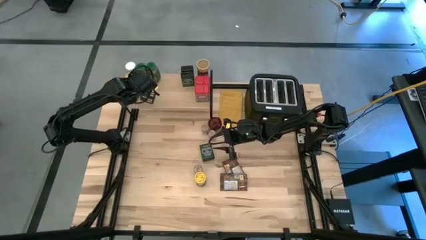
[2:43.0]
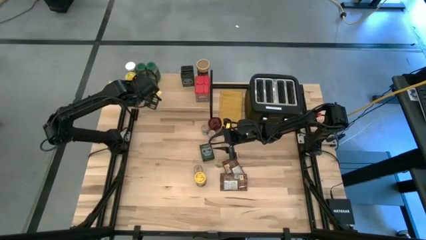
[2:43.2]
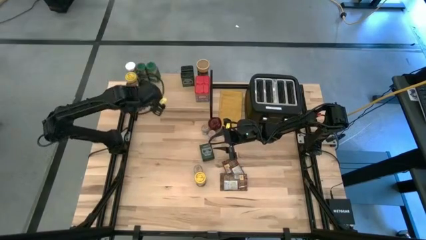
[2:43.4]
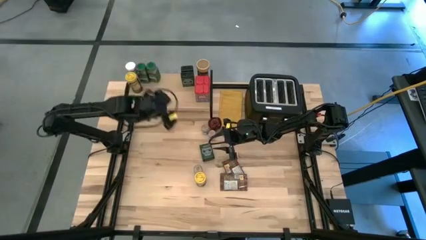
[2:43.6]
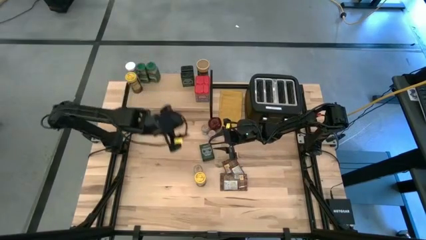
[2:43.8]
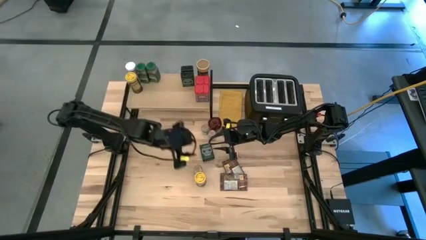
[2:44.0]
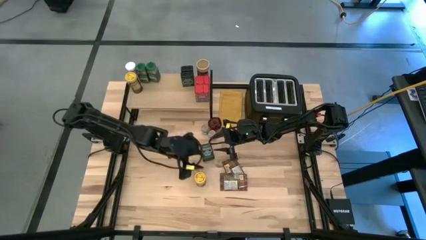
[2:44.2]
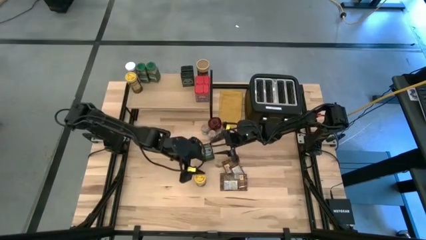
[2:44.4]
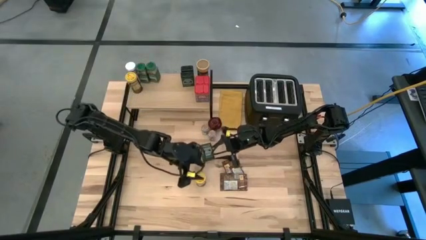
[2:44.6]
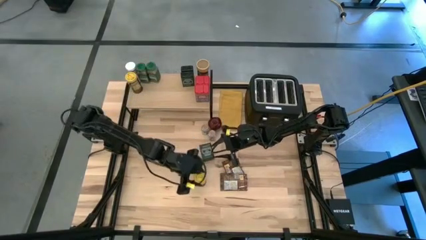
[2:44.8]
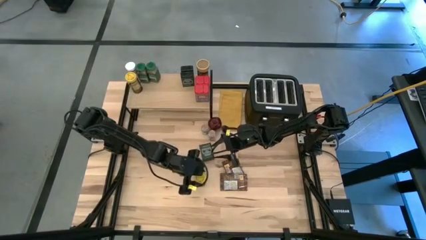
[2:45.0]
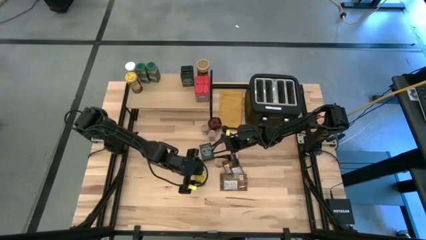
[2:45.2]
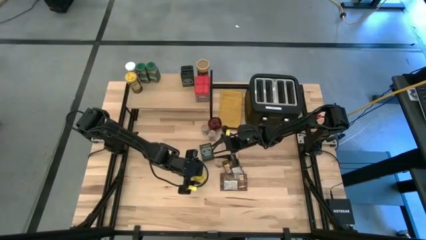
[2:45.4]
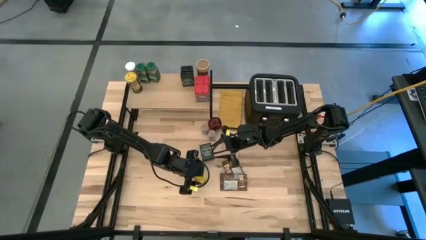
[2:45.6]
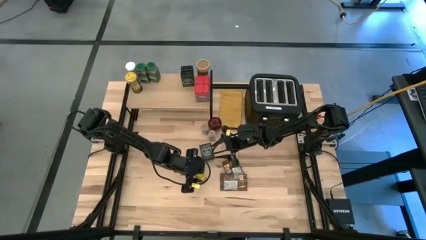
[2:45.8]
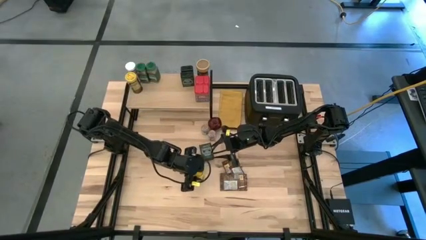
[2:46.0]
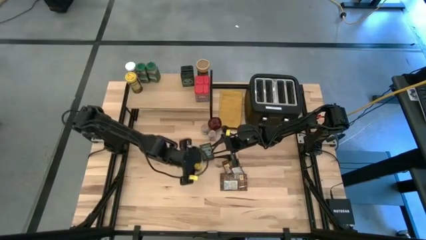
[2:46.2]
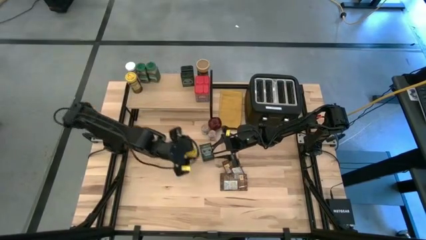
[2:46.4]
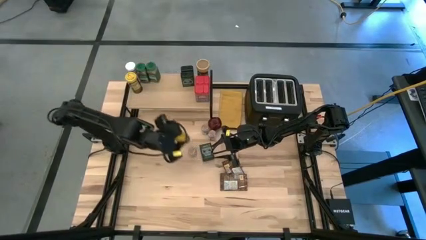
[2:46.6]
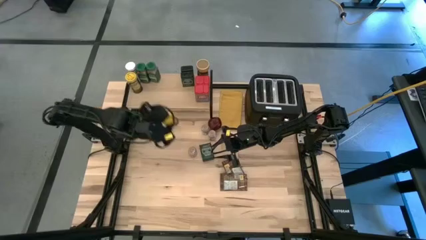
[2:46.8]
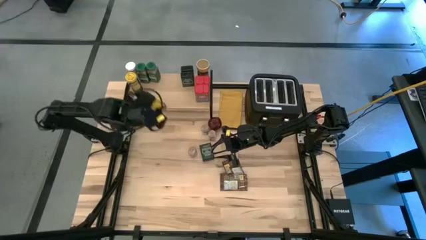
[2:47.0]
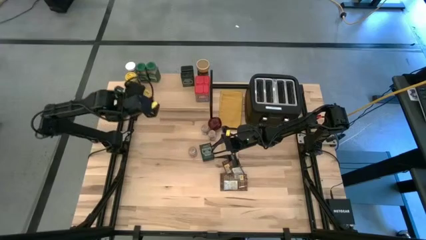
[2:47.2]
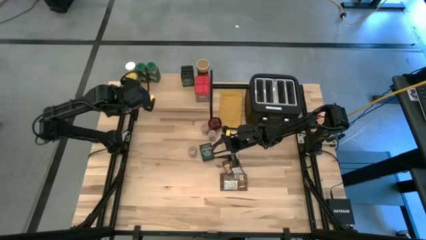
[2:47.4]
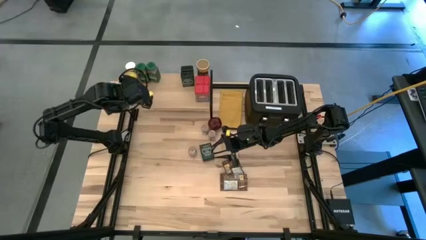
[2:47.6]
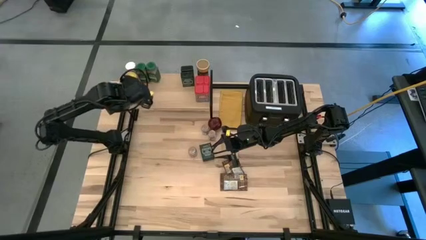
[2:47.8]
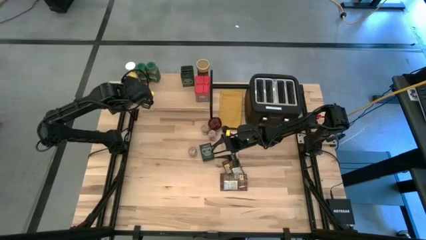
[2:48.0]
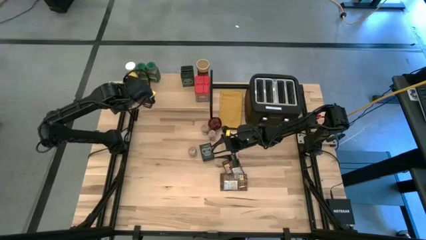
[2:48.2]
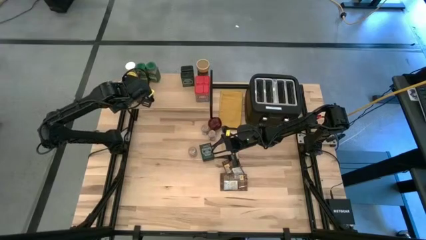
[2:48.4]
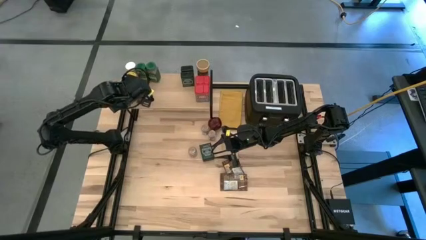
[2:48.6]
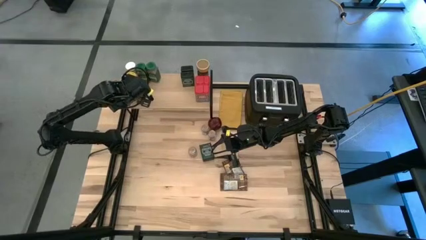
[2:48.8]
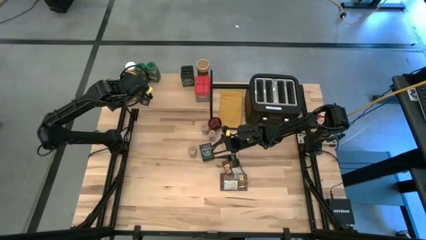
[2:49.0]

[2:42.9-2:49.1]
Task: Shelf spices
Put the yellow seasoning bottle aligned with the other yellow seasoning bottle on the shelf

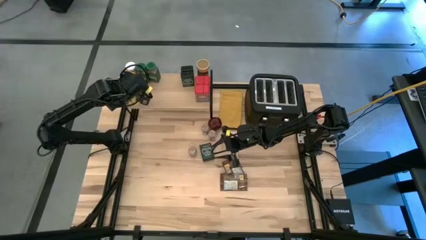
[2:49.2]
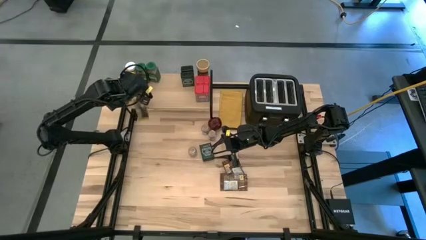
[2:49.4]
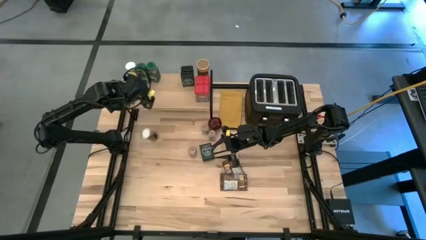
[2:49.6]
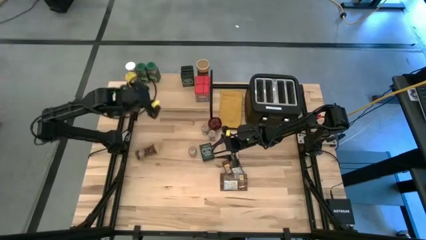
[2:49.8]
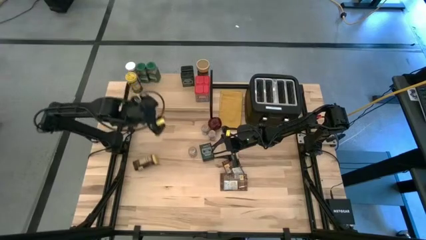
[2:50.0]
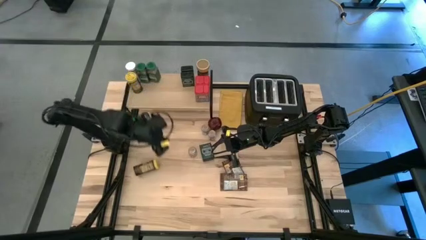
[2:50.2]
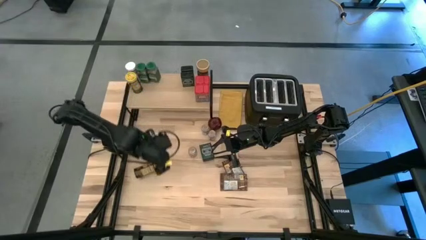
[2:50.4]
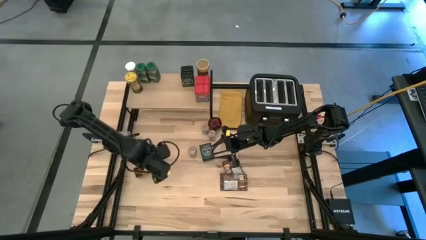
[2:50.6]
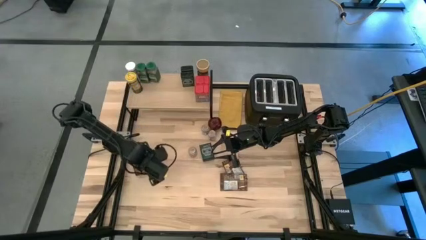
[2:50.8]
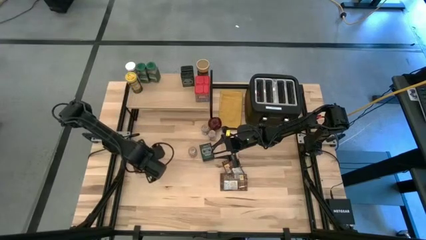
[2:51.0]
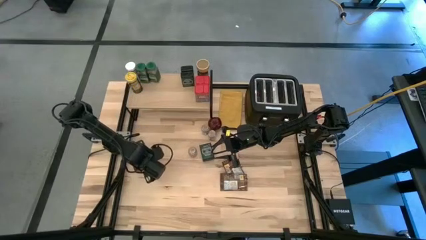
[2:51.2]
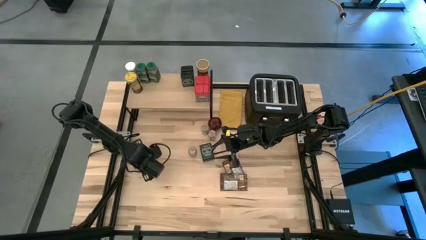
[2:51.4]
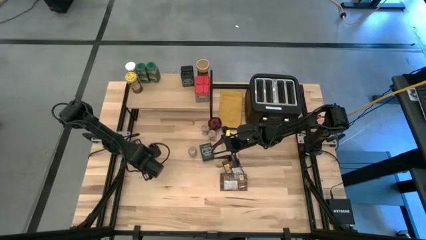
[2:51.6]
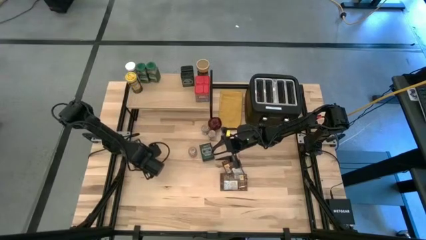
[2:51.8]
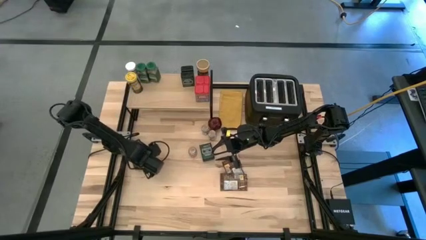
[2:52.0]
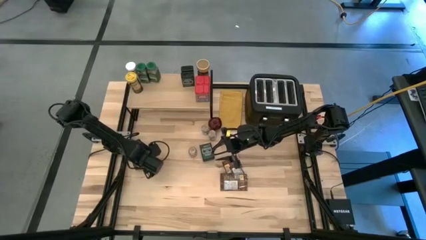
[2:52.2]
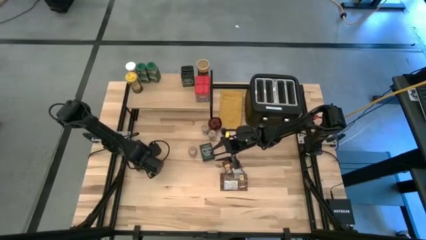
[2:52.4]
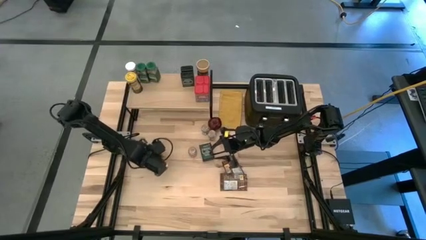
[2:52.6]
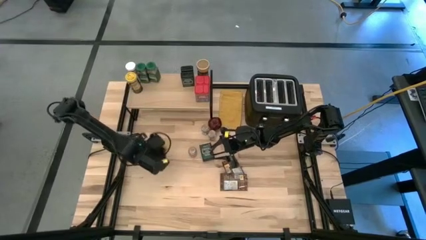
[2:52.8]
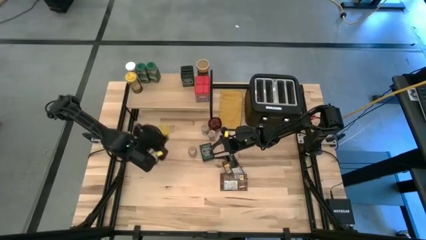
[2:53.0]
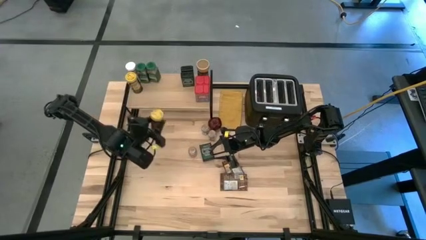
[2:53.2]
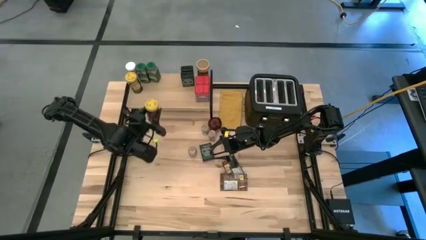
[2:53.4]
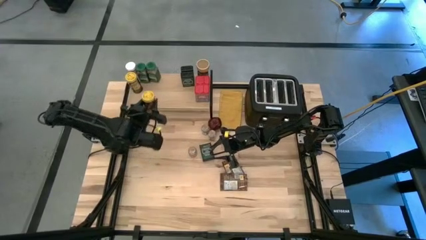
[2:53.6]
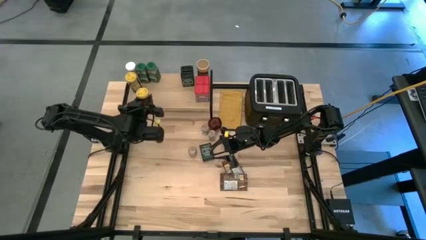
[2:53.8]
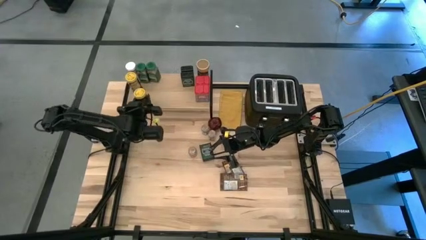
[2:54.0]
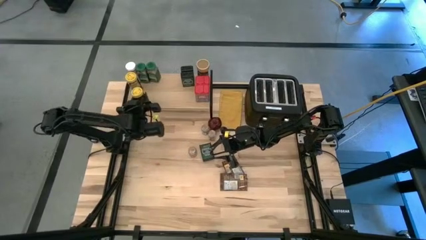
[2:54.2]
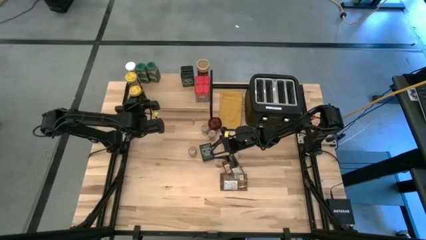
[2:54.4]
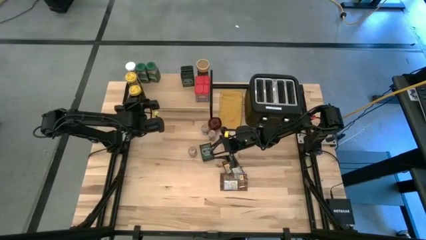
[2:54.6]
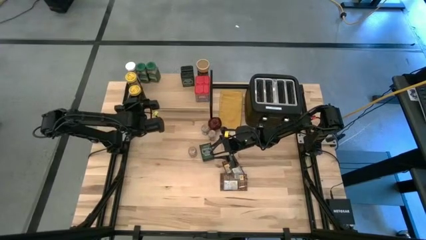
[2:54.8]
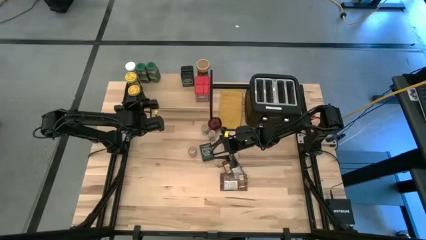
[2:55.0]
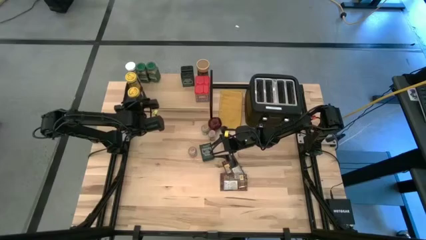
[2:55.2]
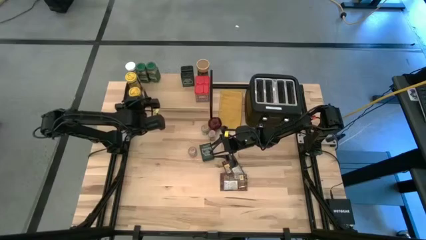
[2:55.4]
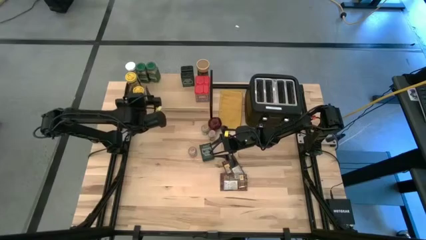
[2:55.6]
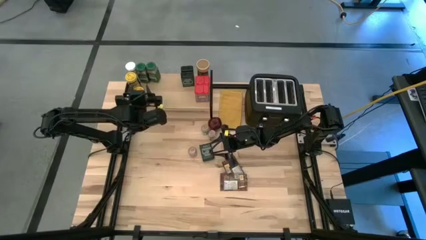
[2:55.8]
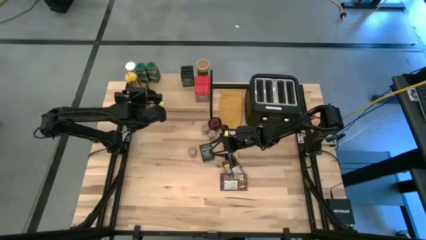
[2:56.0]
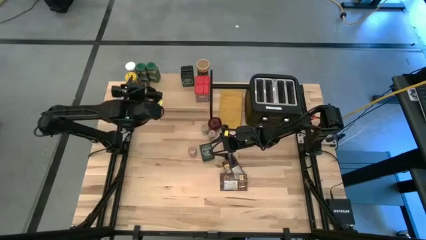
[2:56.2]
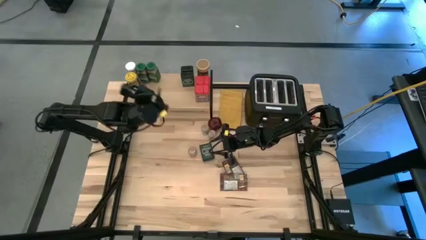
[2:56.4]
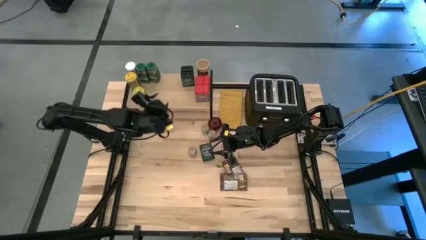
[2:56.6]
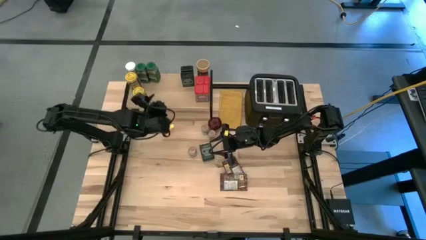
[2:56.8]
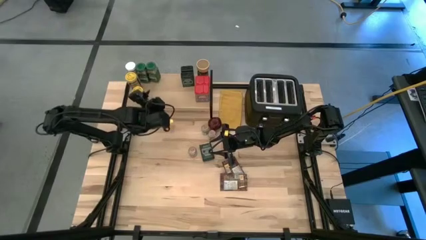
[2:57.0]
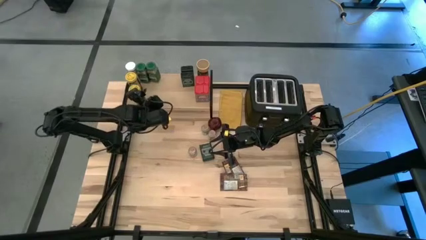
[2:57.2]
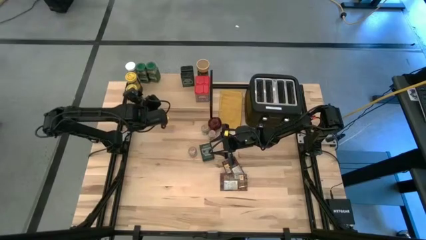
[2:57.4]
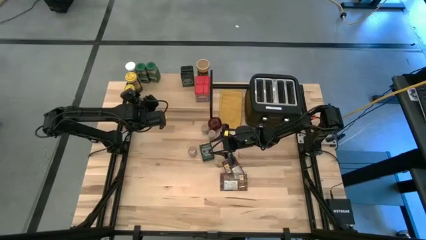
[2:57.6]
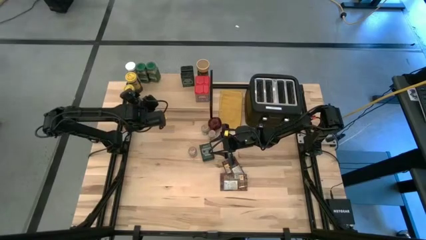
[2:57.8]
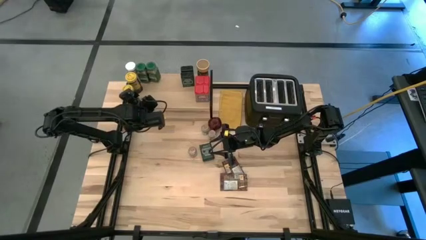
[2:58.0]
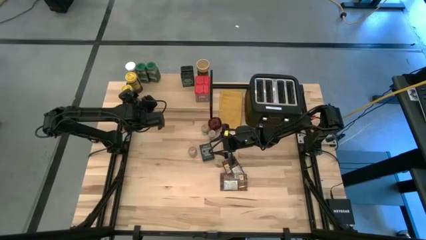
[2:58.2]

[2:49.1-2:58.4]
Put the yellow seasoning bottle aligned with the other yellow seasoning bottle on the shelf

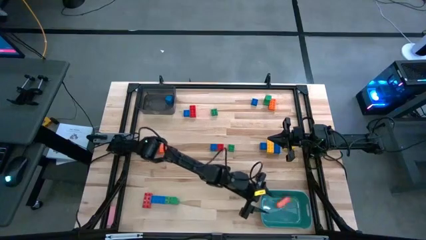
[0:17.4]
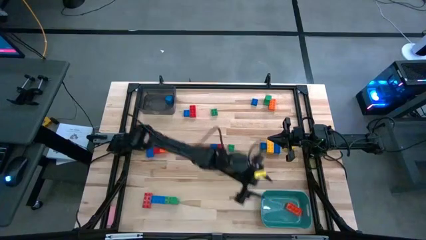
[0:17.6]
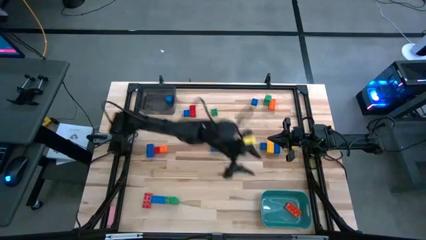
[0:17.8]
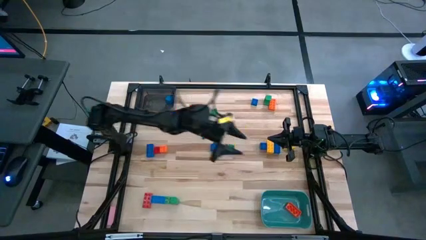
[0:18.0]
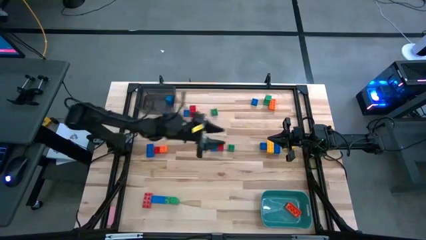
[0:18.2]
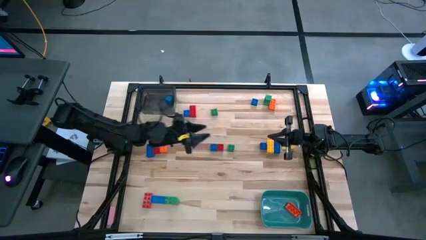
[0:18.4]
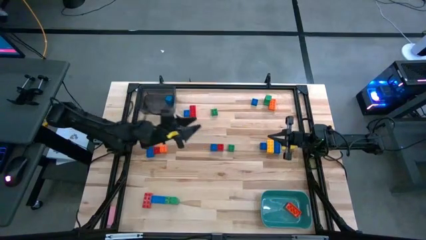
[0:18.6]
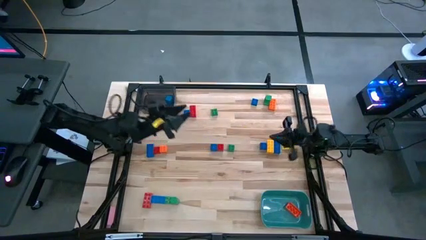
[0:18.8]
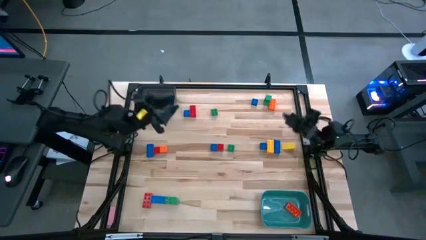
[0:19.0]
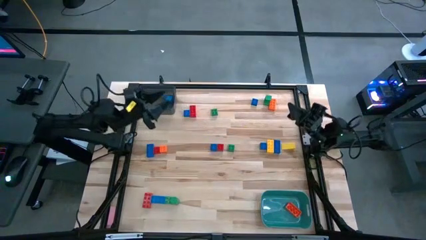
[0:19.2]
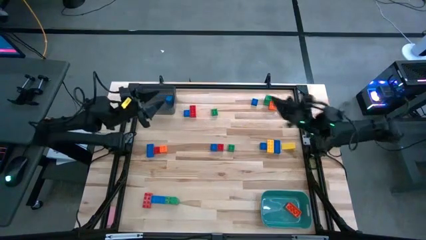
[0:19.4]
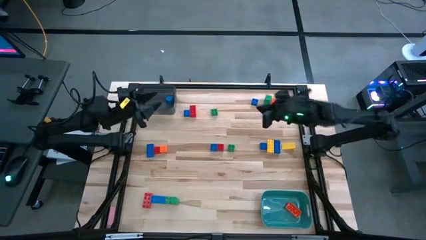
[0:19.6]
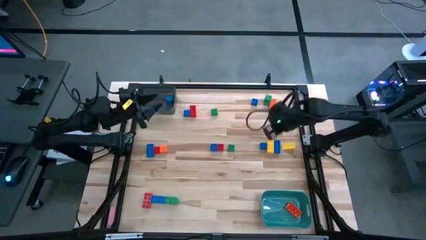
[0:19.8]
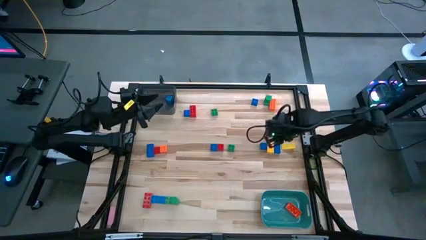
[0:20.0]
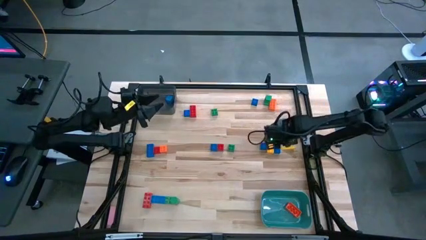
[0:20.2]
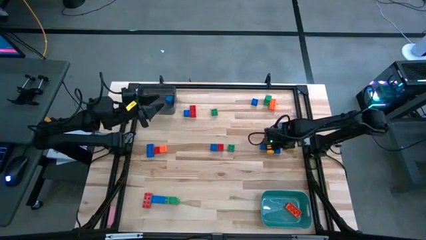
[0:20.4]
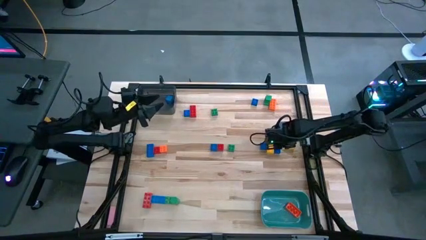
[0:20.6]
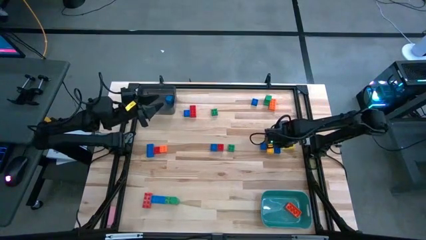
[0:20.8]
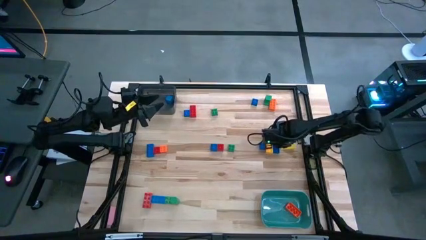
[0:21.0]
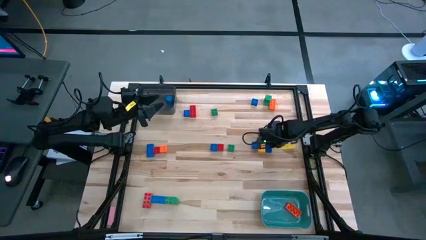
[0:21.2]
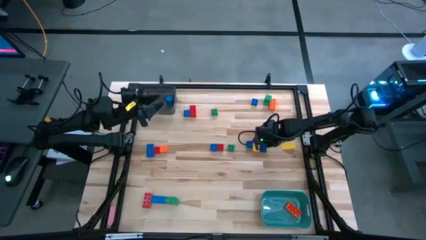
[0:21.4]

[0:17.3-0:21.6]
Task: Sort blocks by size
Adjust the blue game piece and the other game piece to the center
